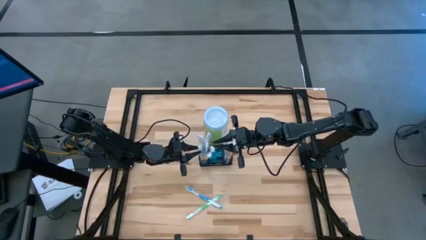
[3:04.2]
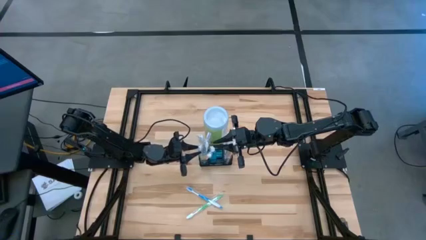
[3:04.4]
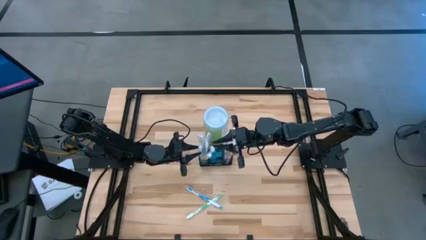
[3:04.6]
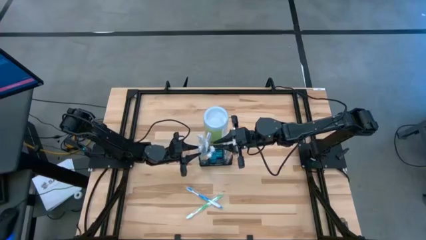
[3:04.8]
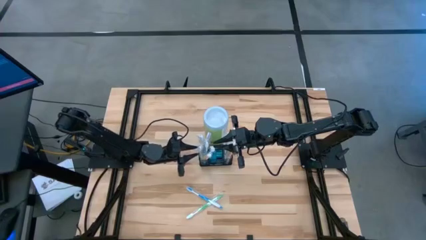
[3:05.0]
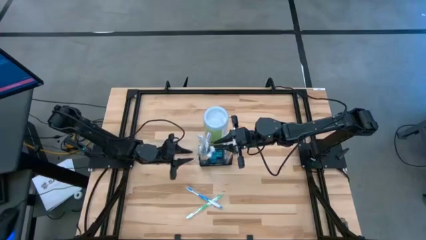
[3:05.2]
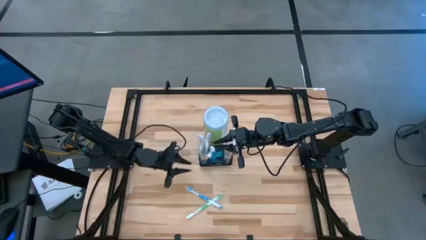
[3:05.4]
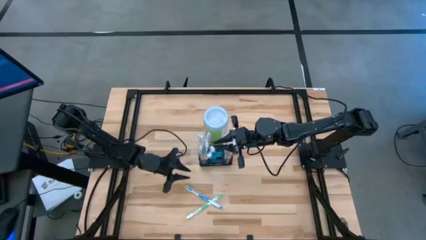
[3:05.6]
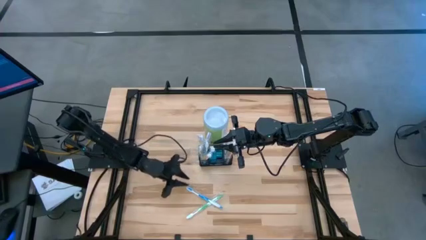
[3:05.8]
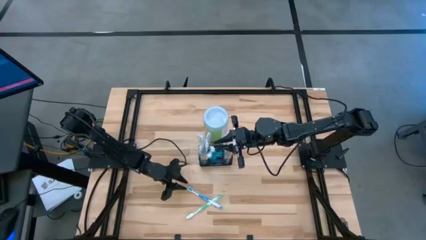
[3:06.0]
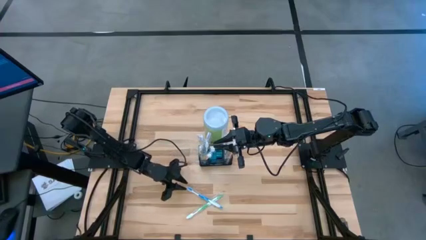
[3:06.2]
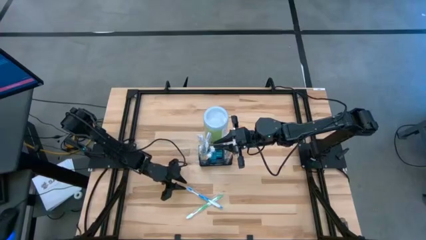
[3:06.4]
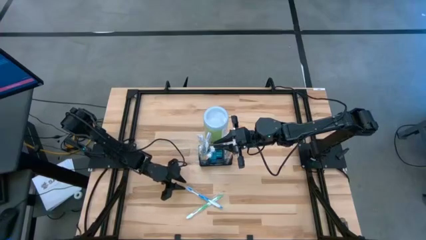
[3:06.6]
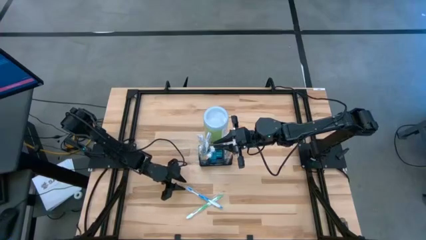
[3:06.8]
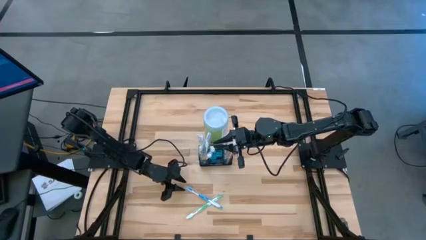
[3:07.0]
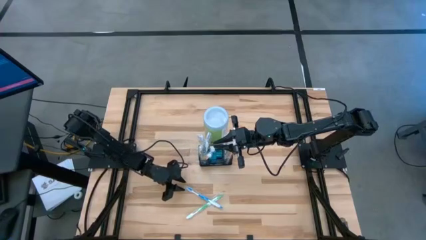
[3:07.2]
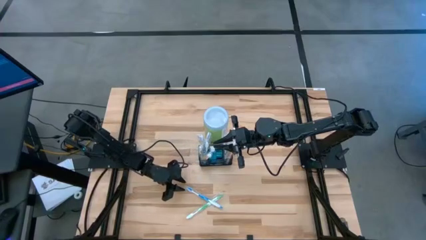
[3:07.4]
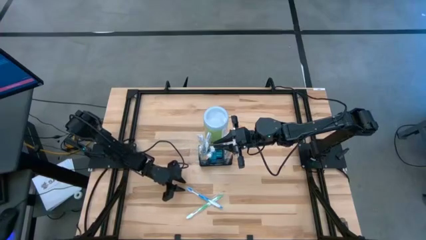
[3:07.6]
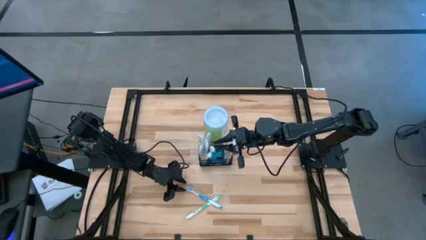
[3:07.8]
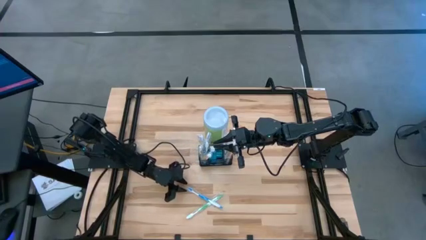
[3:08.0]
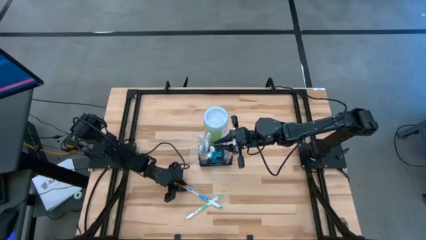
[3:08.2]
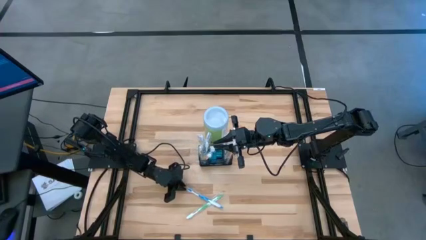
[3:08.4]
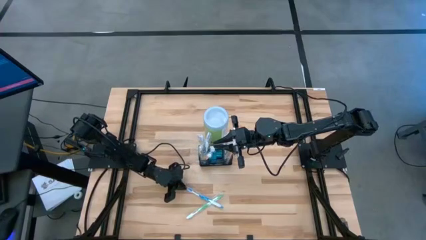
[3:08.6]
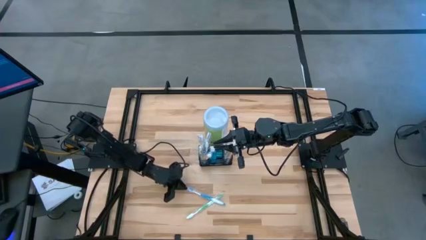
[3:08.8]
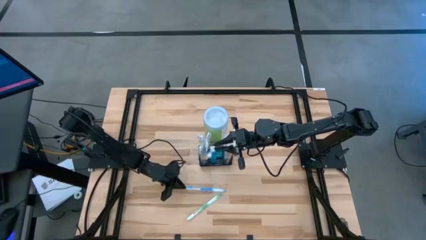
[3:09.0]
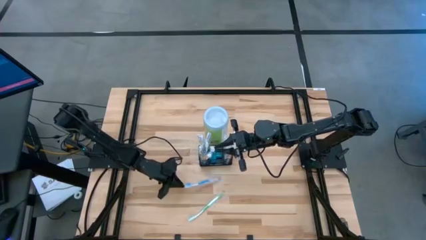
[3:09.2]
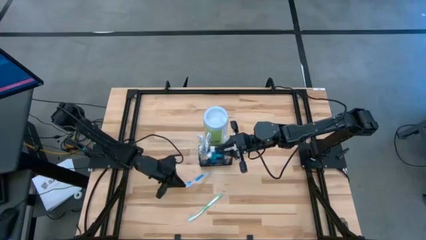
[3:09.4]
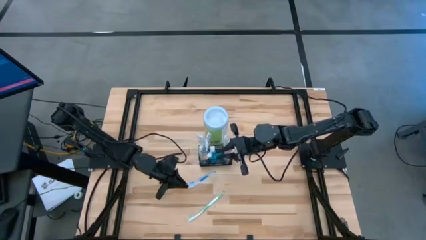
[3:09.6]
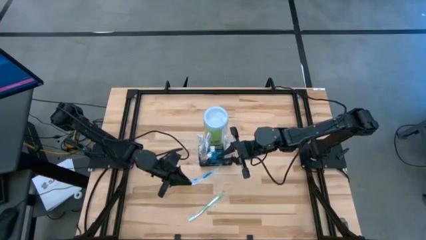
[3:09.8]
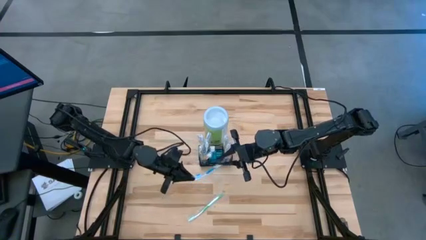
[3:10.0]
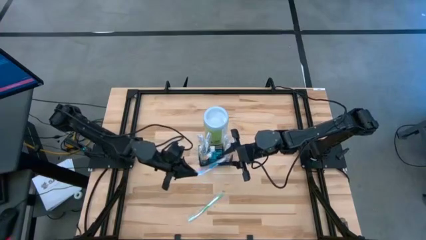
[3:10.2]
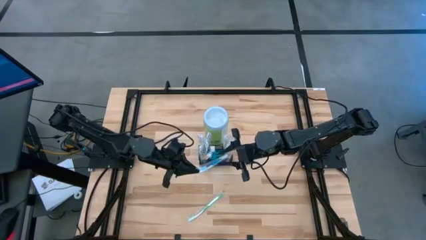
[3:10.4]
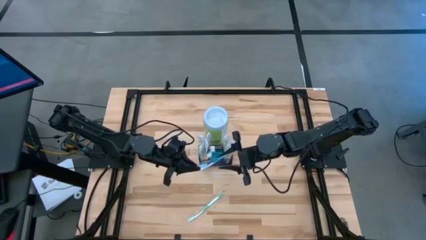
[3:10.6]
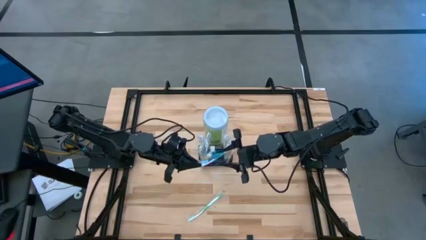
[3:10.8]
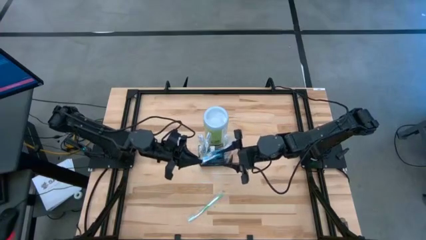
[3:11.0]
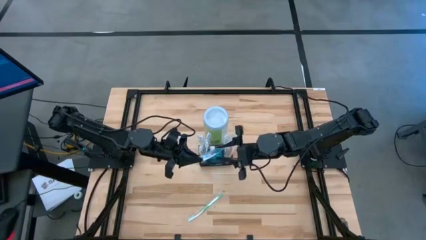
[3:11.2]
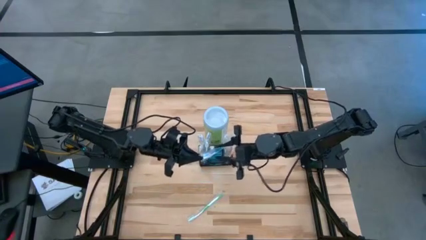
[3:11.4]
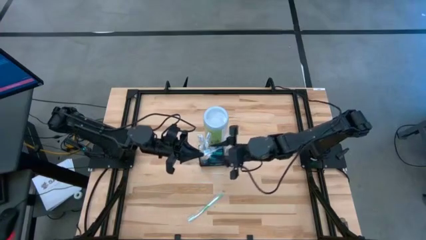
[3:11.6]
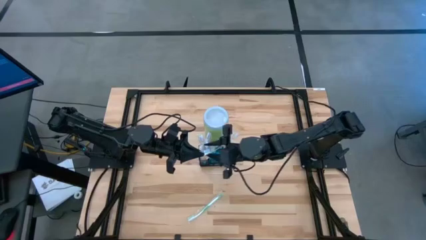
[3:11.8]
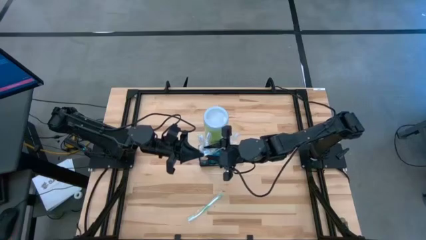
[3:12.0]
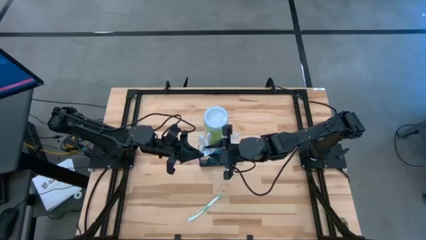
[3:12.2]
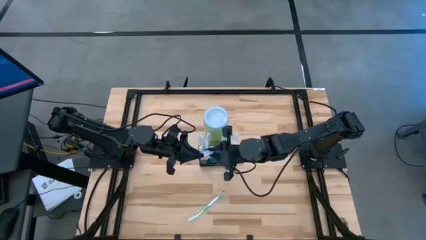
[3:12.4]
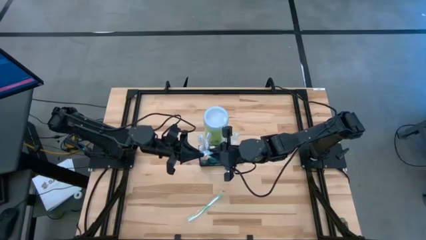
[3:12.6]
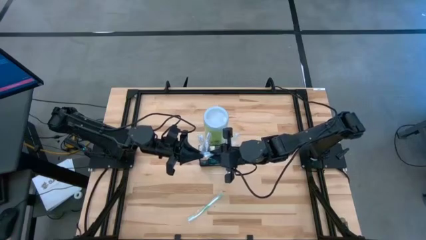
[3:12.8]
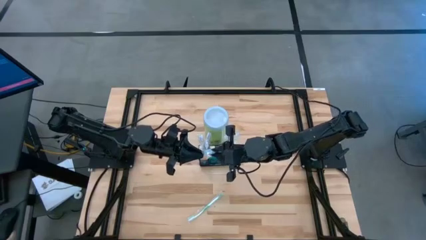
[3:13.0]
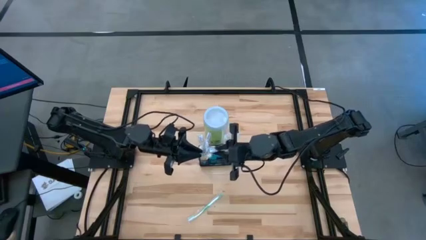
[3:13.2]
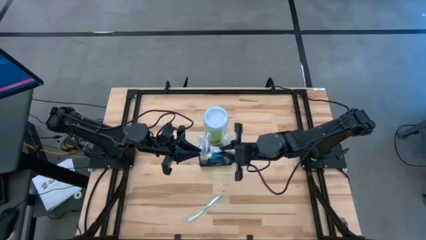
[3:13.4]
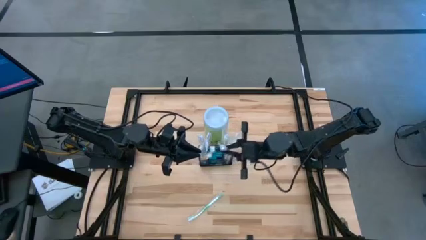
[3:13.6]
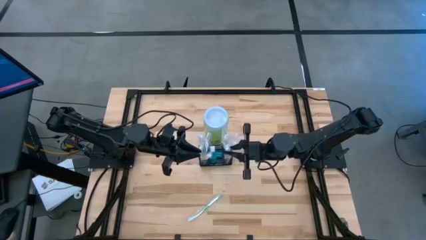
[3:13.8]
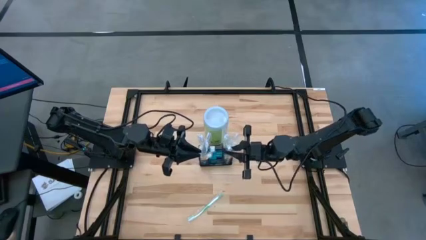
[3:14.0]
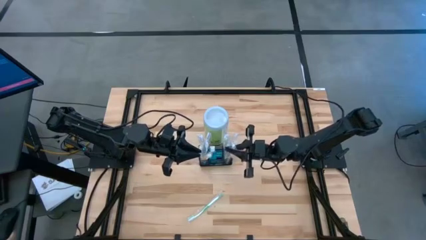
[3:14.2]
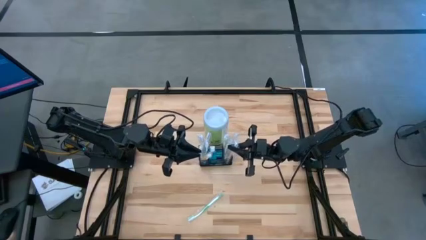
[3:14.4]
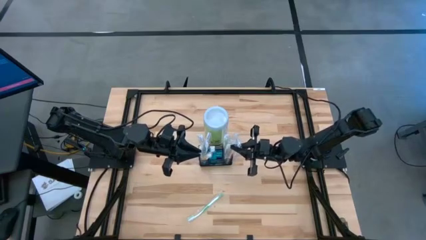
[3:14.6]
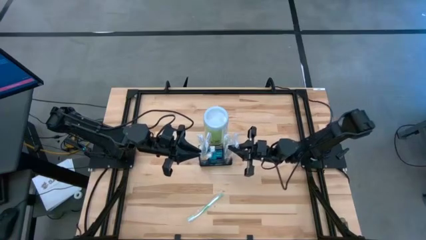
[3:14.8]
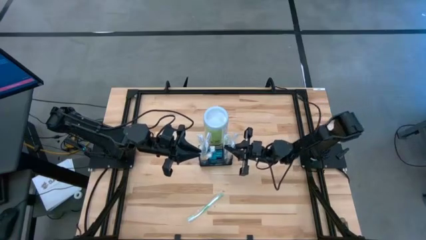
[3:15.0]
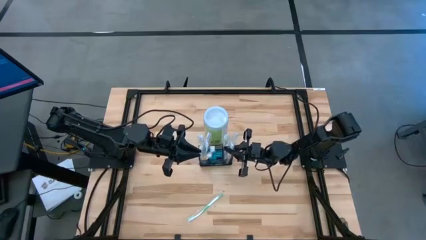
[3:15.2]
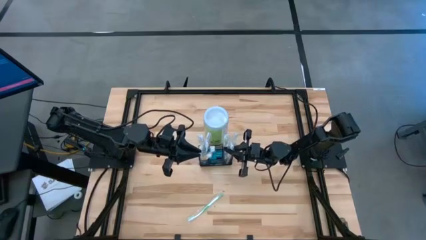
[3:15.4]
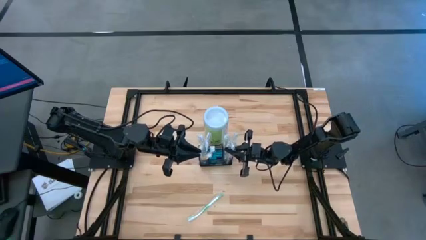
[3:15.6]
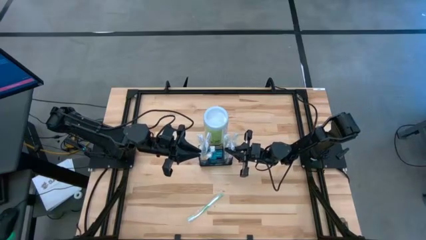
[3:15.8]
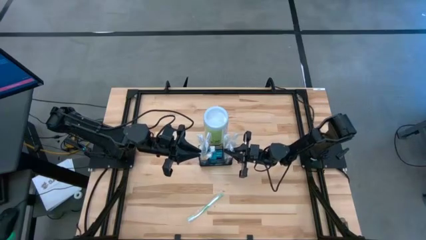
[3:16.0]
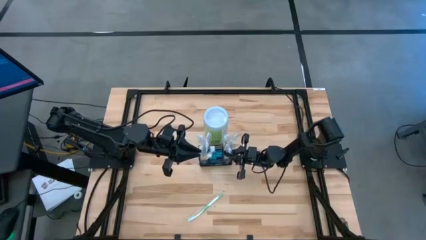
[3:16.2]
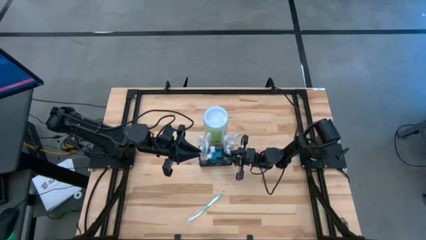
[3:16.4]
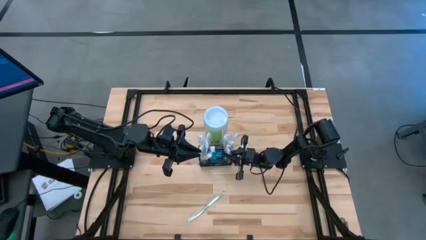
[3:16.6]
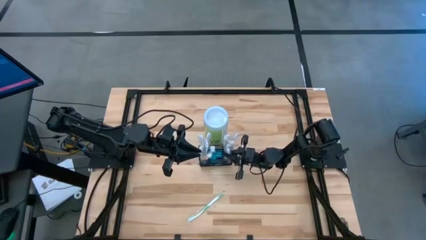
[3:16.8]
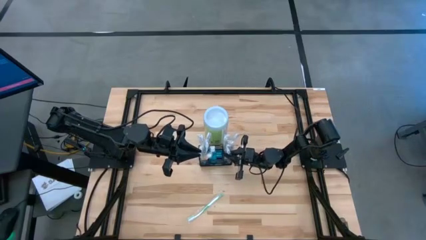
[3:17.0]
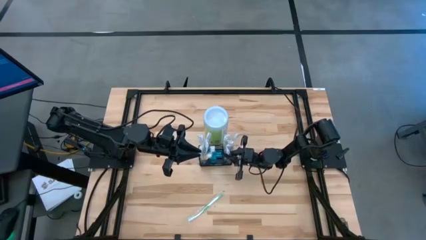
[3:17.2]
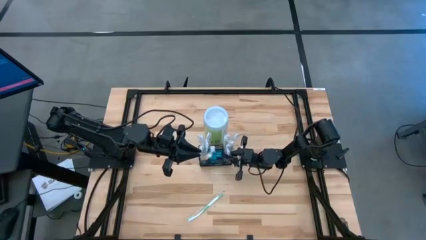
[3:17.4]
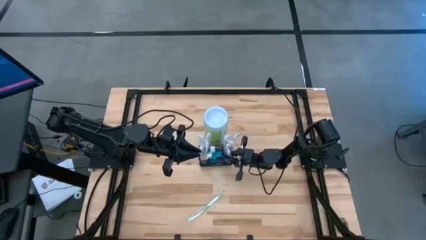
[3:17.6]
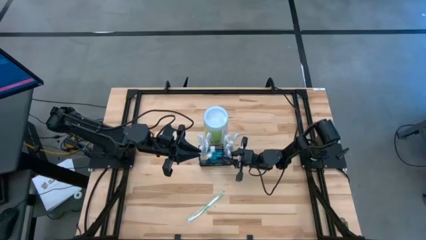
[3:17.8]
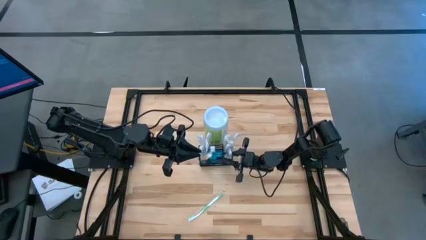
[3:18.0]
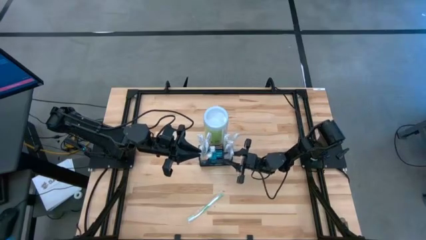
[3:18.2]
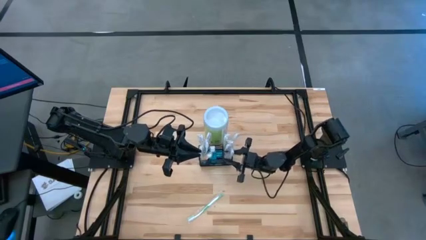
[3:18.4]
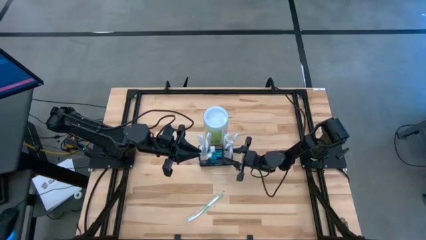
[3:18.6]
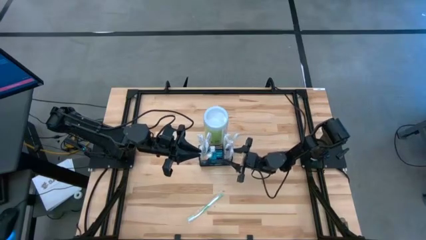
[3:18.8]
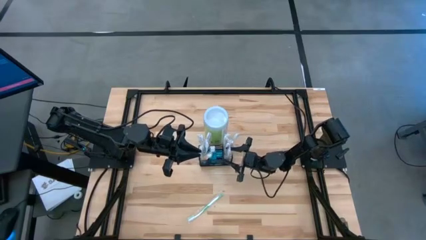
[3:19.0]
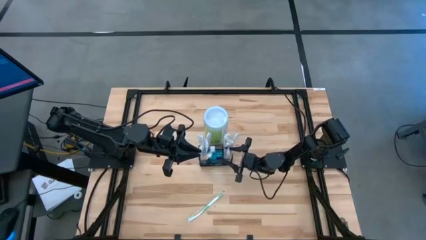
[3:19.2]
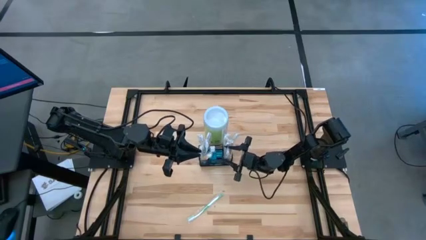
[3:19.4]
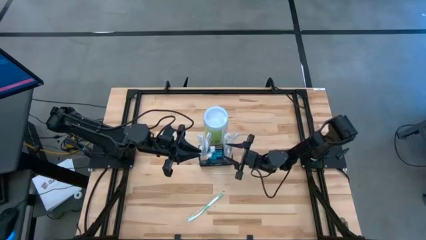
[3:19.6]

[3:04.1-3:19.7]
Task: Pick & Place toothbrushing station
Put the blue toothbrush into the wire organizer

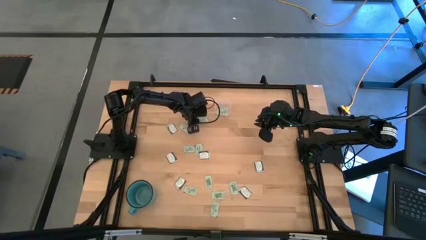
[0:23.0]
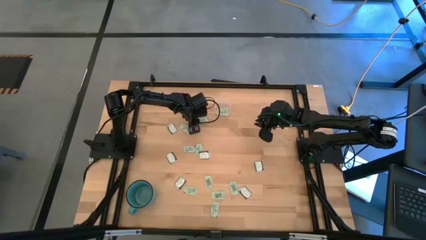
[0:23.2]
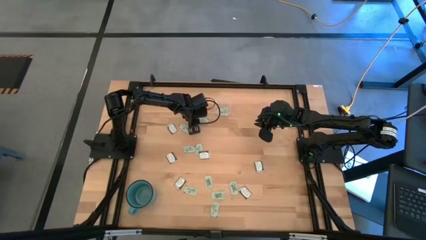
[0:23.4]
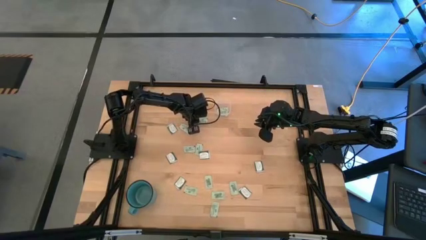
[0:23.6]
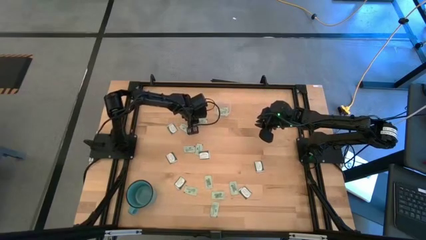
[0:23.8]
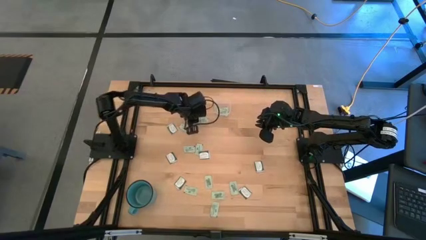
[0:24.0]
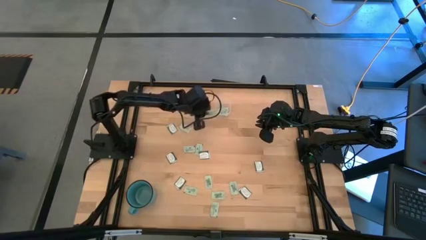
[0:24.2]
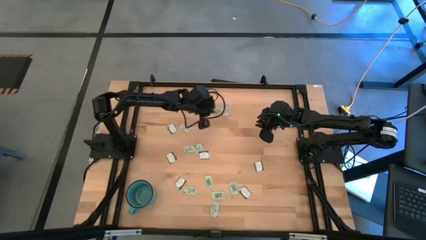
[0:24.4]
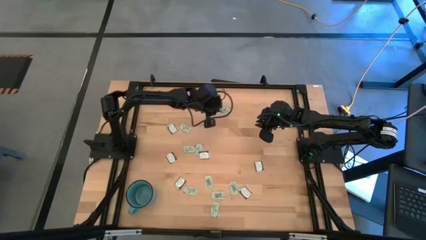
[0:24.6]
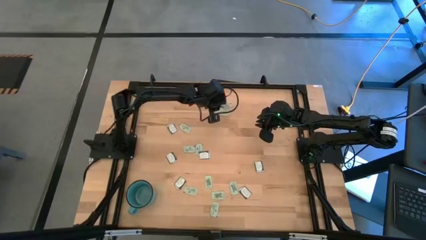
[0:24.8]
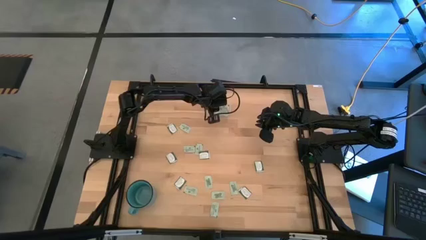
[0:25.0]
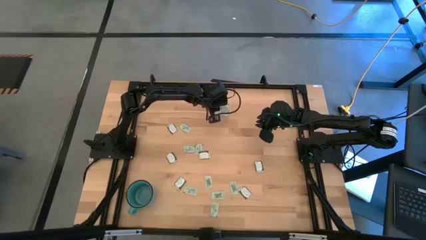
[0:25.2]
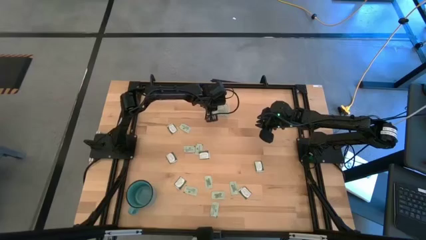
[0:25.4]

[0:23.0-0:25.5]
Task: Pick and place items into bin
Put the light green stevia packet into the transparent bin
